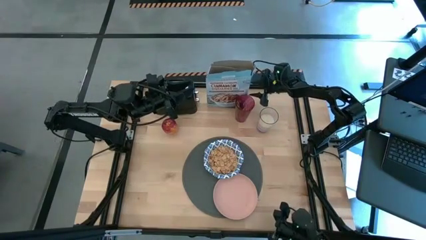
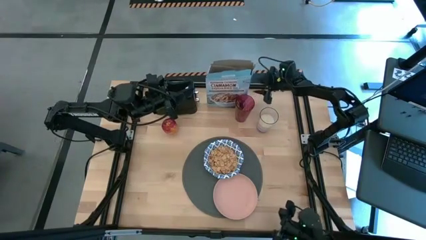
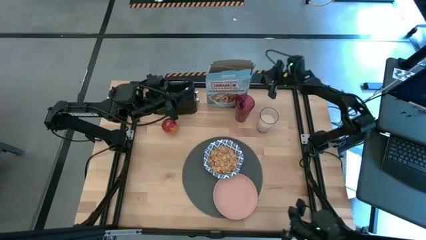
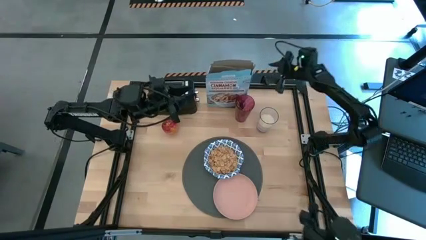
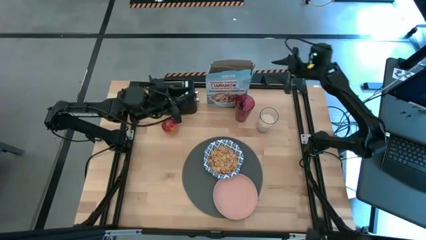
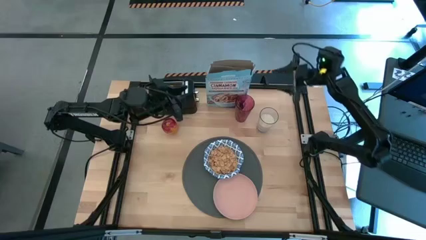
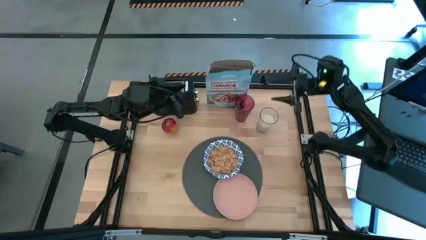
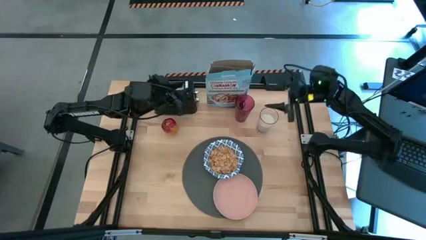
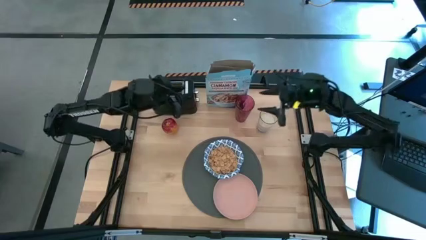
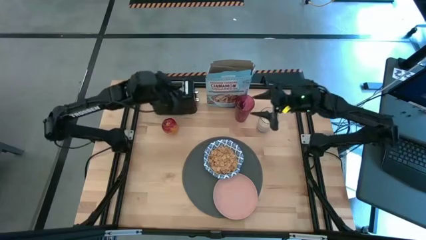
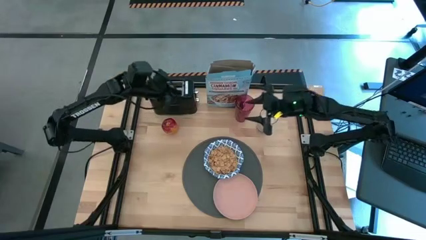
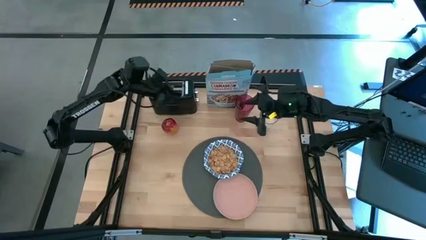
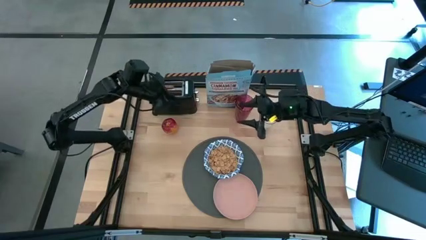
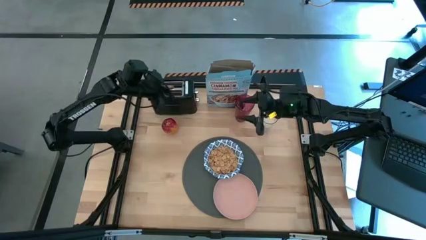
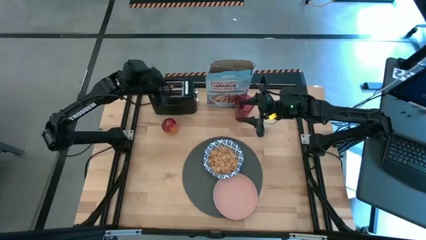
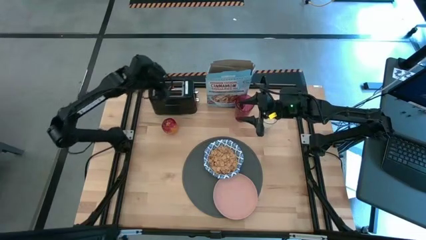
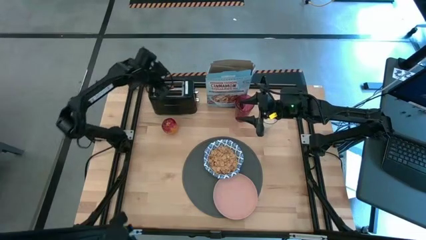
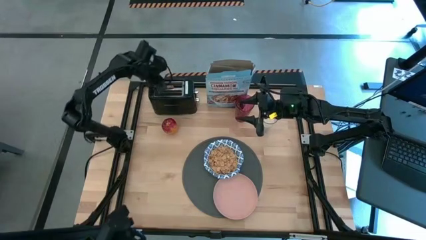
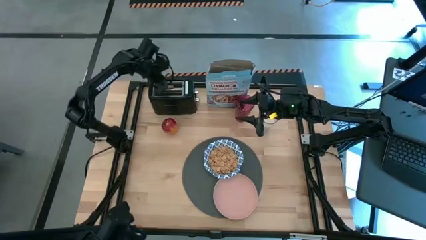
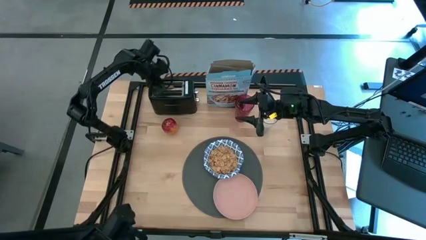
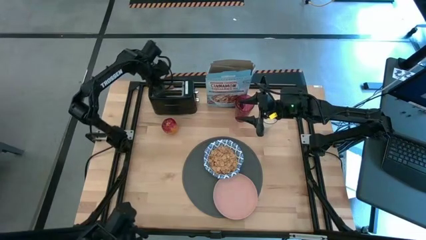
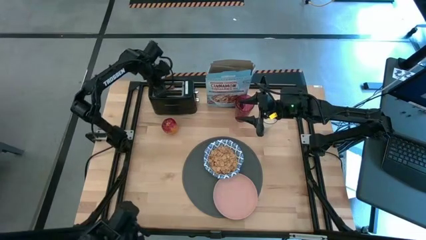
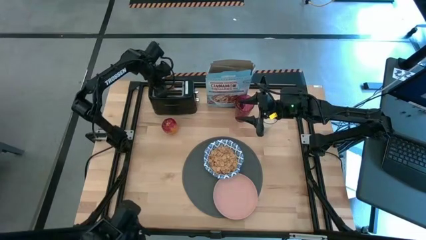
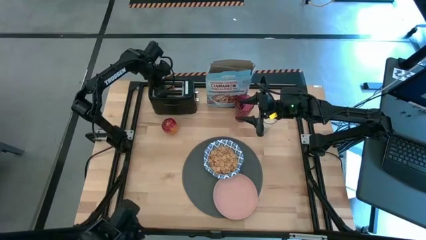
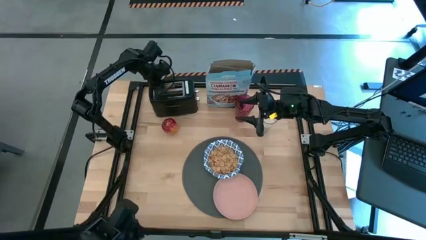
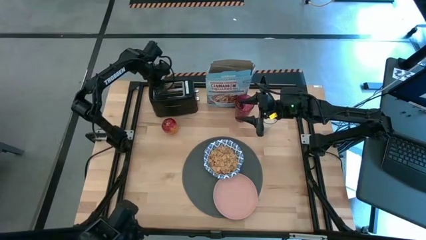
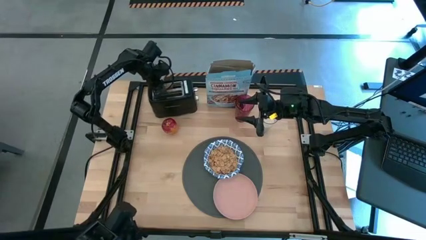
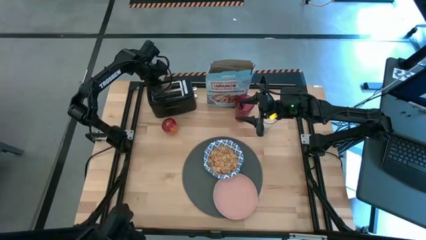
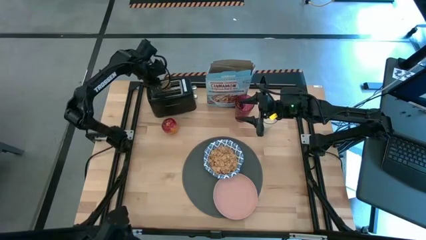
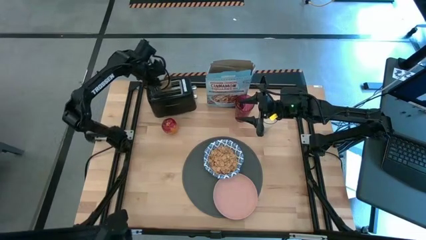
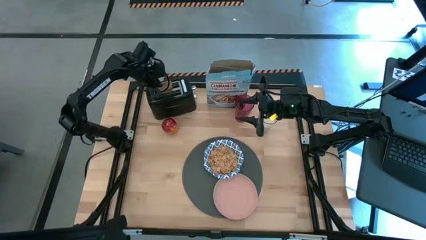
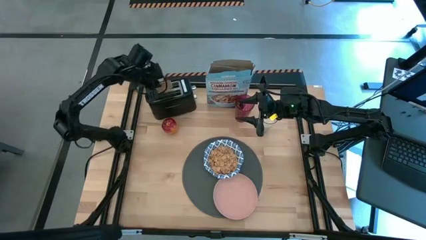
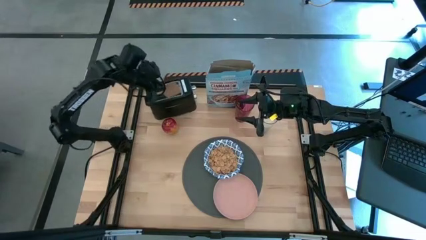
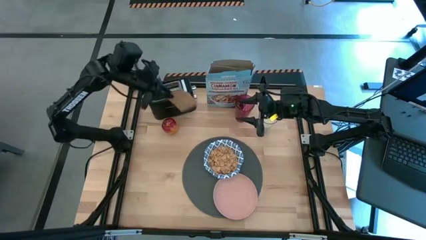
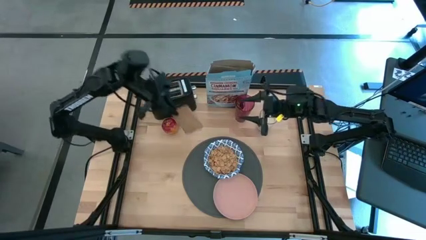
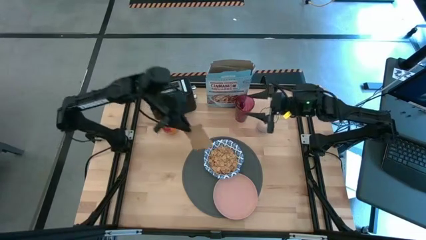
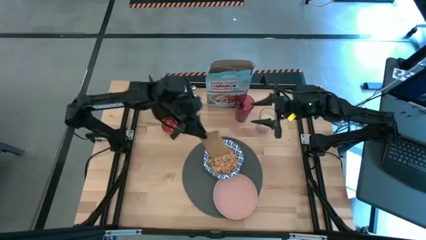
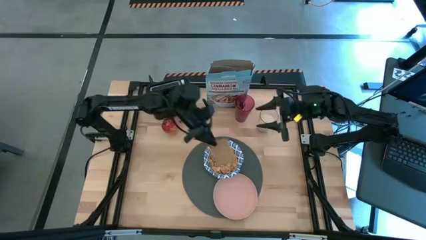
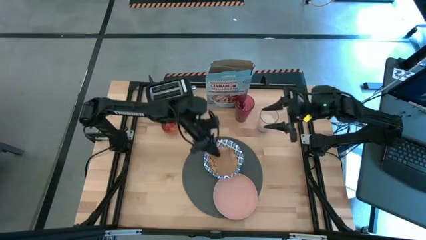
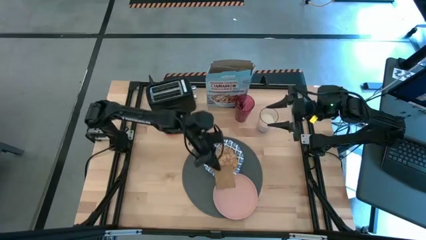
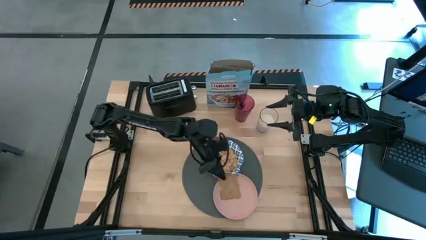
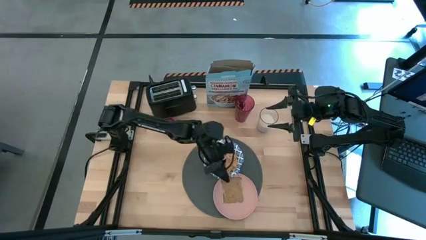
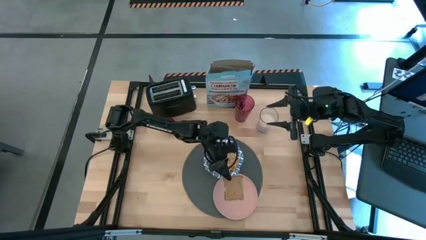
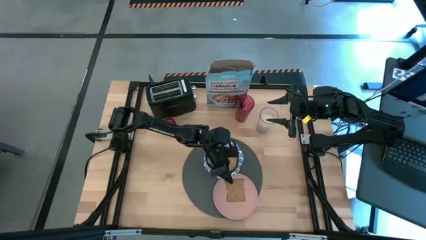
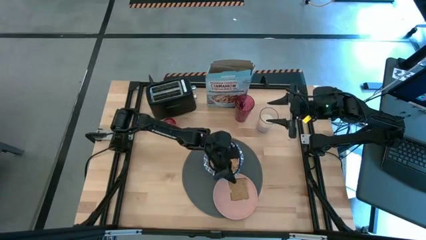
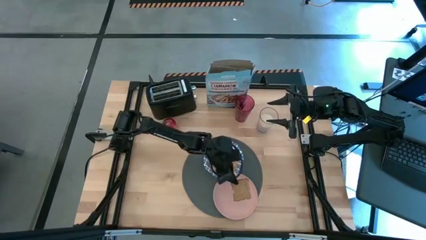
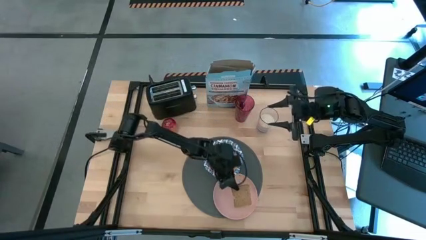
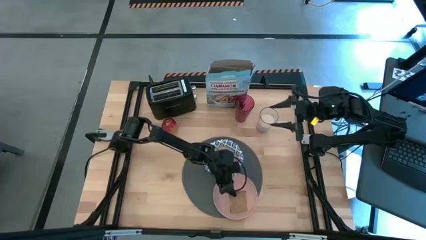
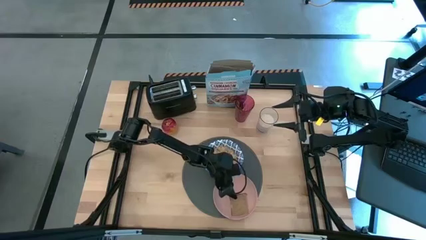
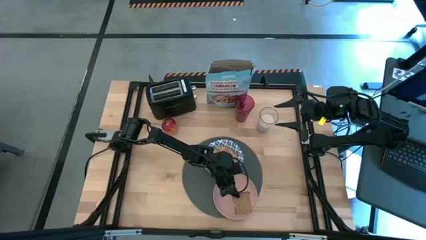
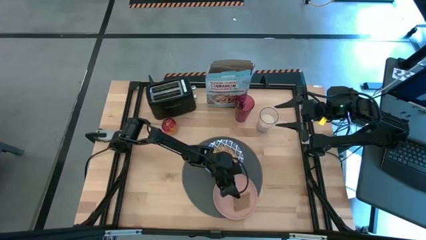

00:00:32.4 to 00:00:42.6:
Task: Arrange a breakfast setting
Put the bread on the pink plate

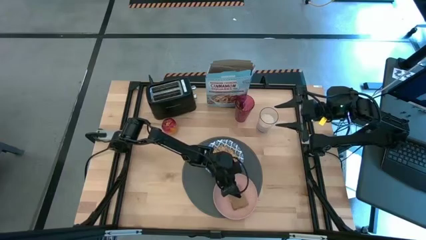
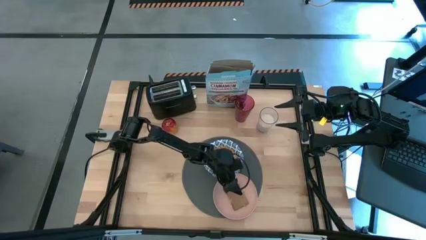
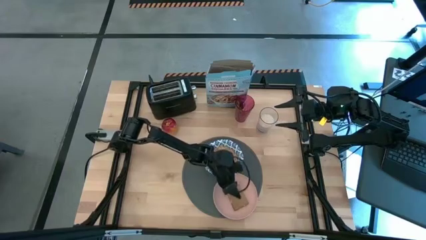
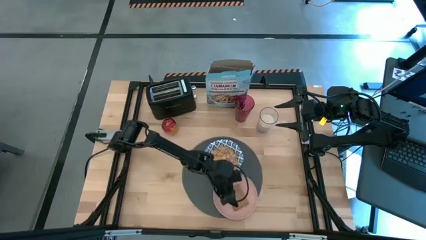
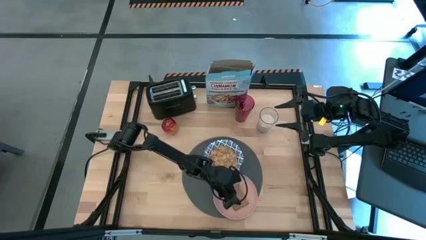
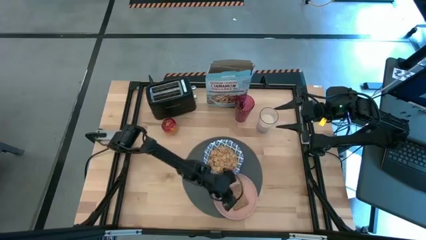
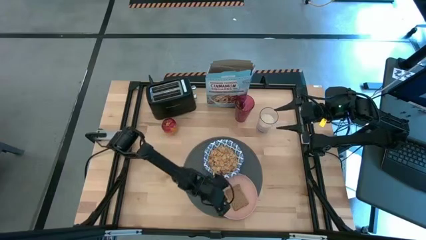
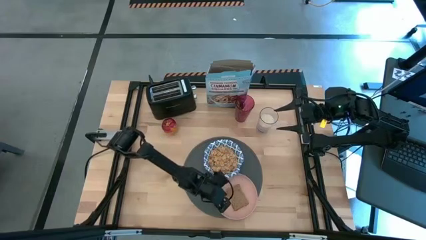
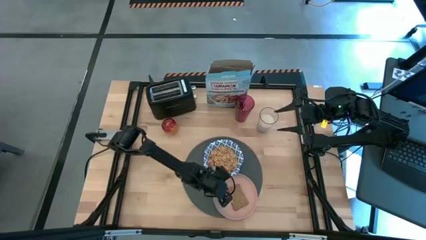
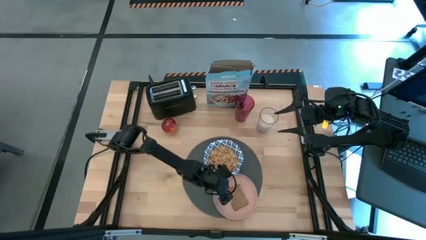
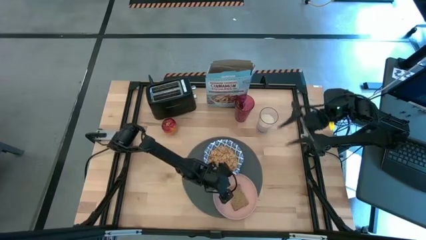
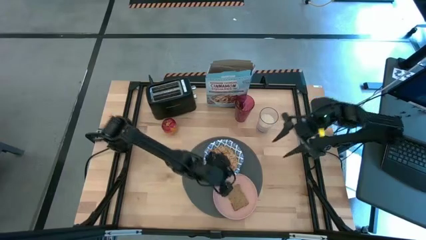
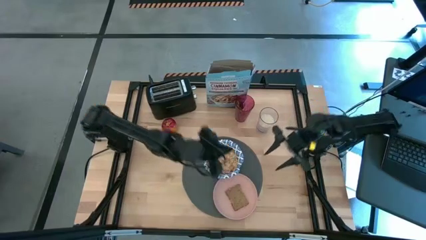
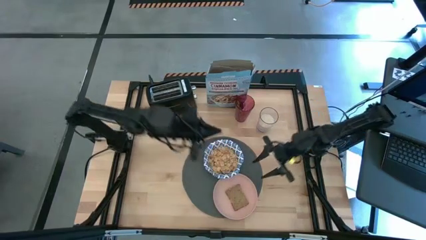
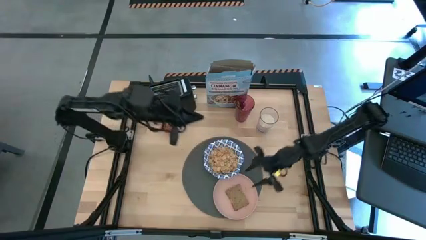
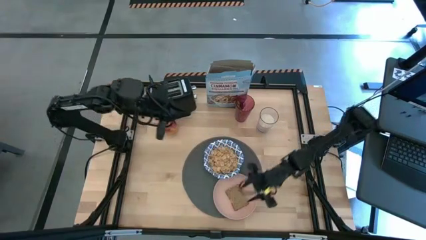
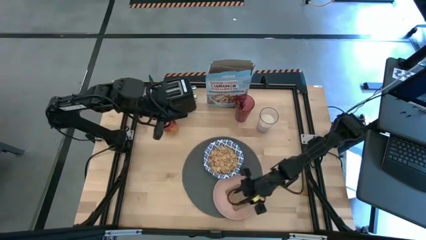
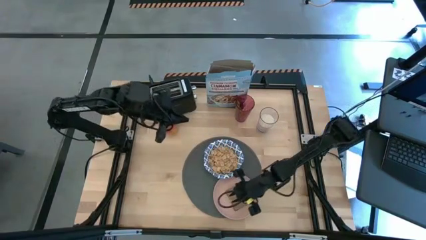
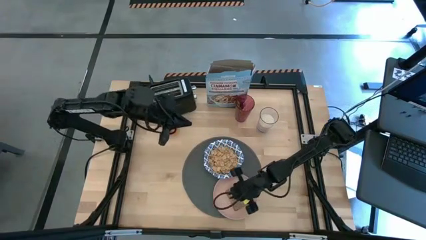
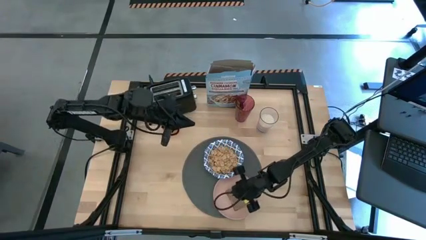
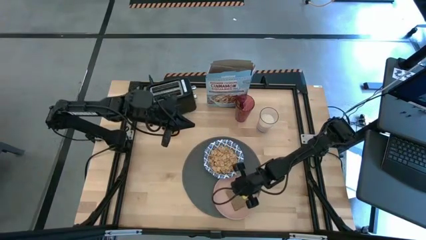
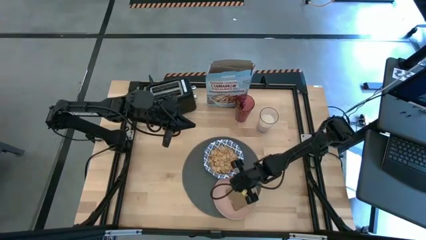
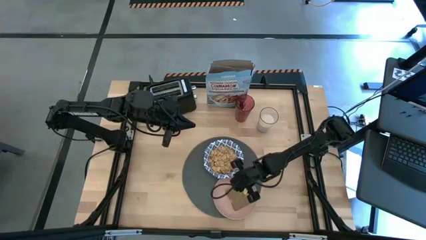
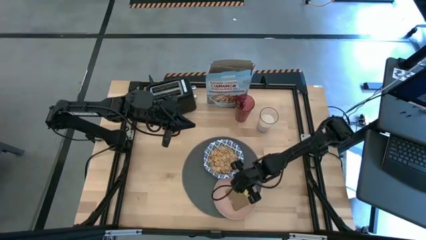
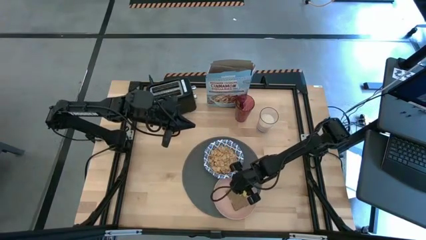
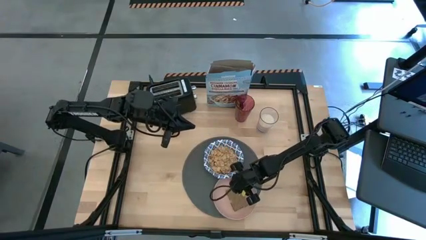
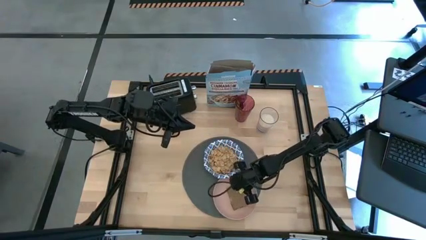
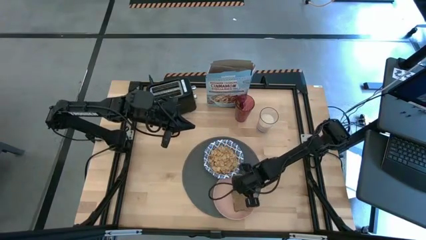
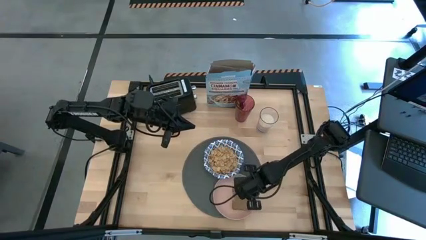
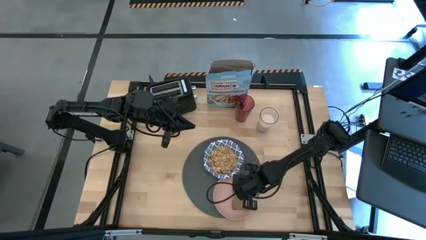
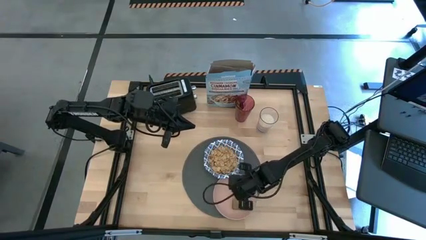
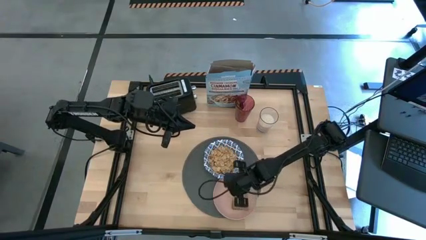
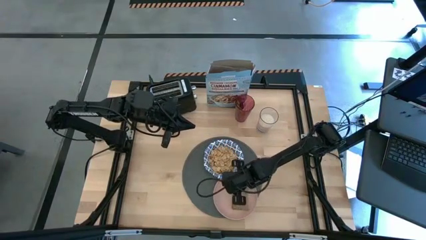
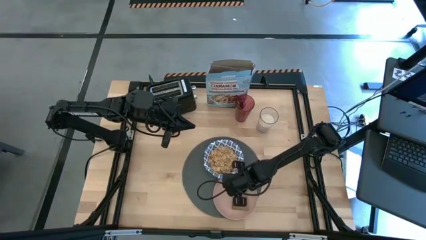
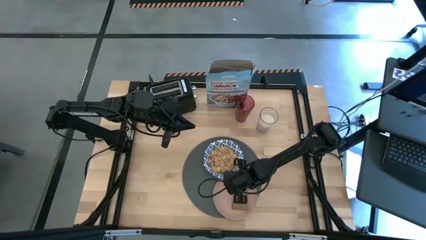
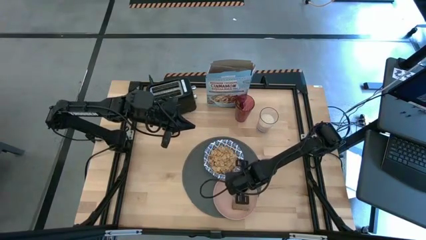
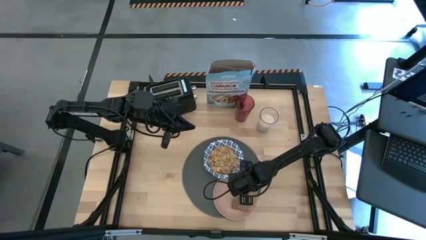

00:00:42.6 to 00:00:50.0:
Move the bread to the edge of the plate
